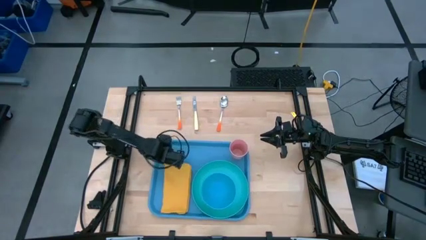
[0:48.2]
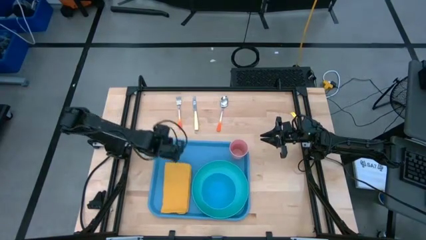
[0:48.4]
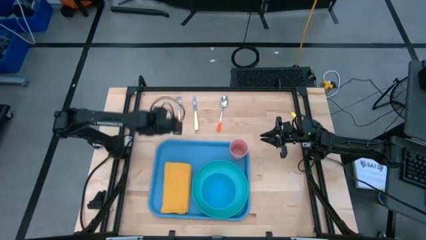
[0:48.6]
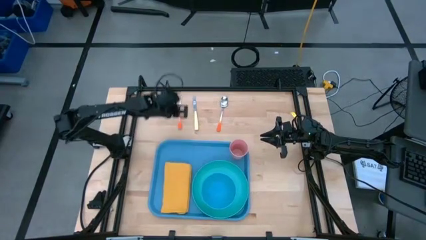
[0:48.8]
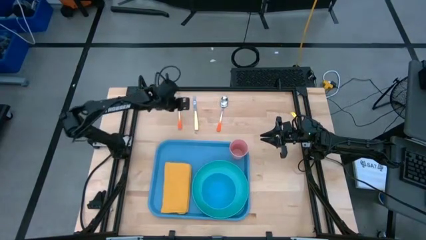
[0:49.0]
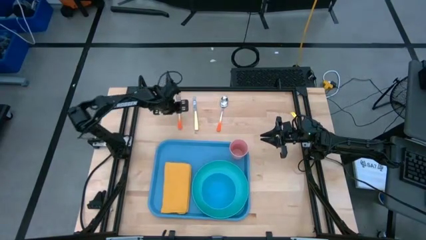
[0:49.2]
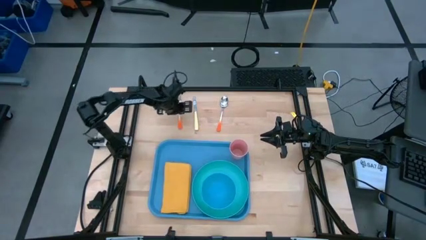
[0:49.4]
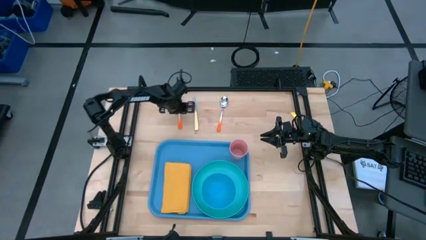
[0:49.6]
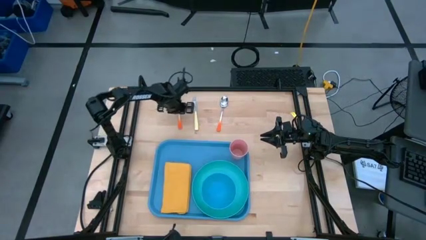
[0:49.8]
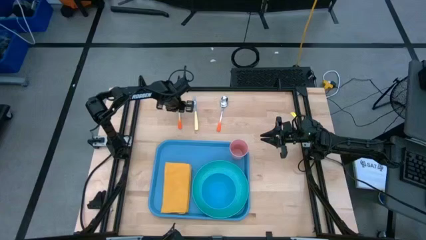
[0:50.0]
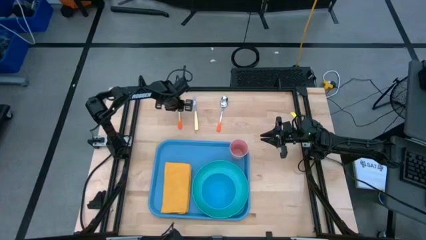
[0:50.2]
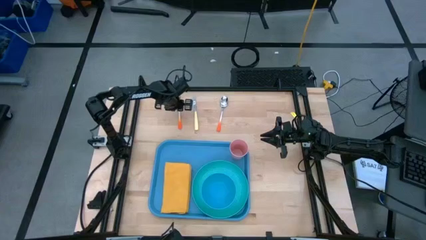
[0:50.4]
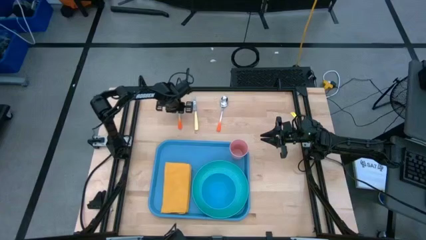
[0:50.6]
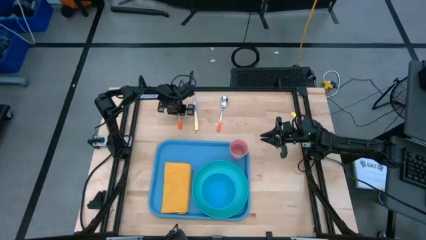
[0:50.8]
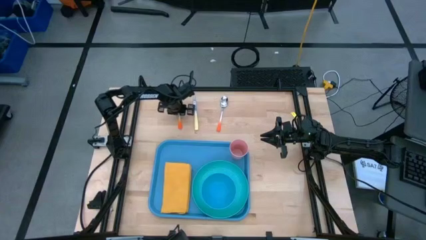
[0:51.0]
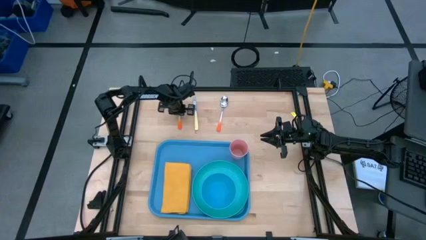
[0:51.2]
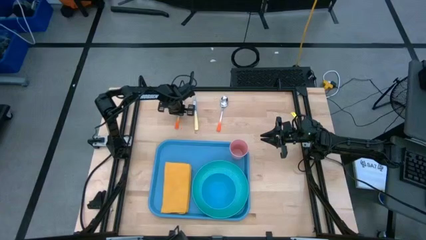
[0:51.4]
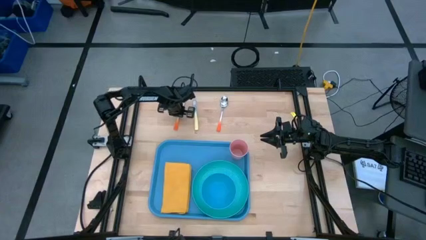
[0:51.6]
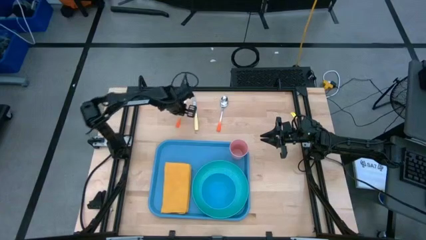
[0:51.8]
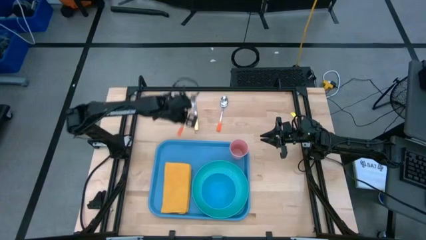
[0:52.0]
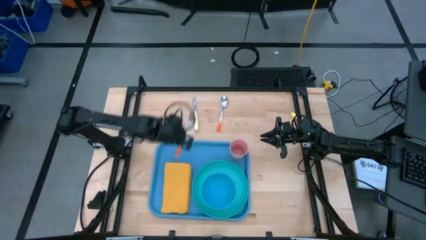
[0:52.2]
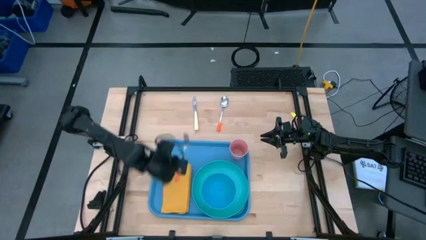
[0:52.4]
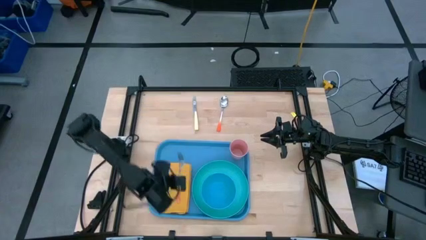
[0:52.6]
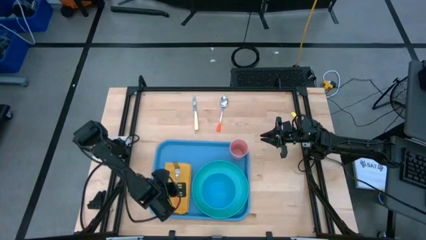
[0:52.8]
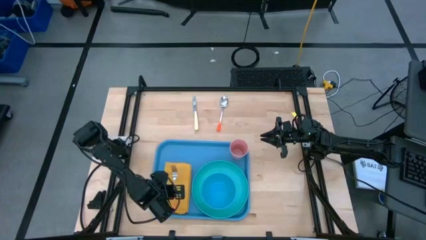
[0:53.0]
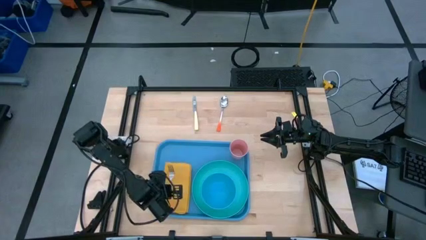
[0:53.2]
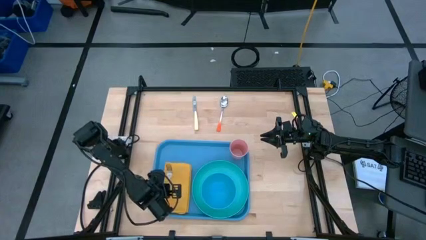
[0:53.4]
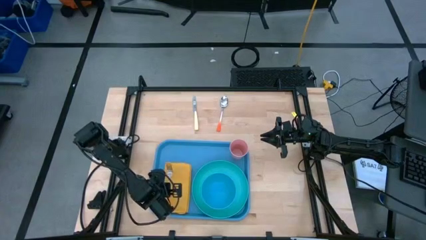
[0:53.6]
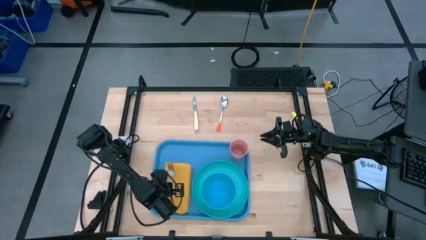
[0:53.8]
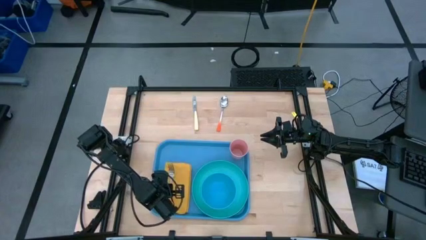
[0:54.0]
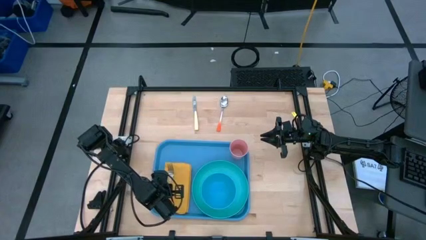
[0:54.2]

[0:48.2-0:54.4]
Task: Set up tray
Put the orange fork on the yellow napkin

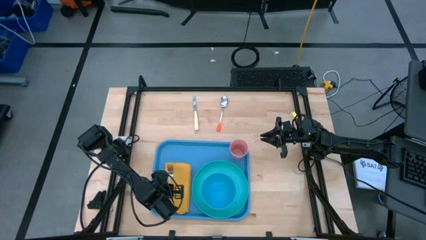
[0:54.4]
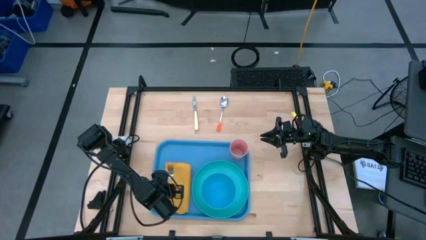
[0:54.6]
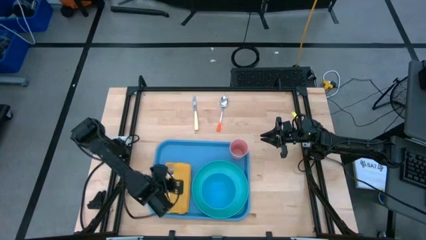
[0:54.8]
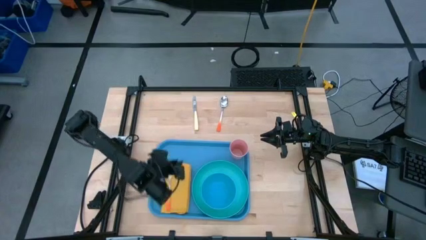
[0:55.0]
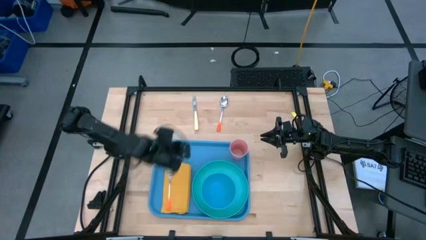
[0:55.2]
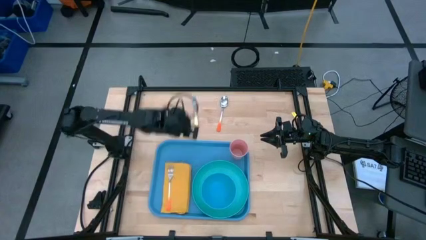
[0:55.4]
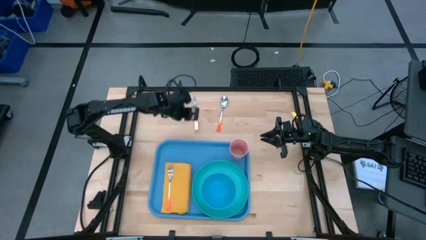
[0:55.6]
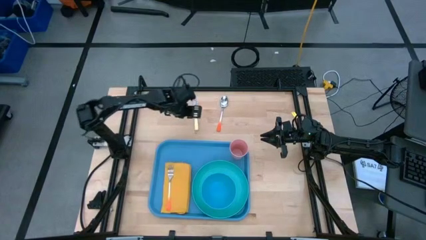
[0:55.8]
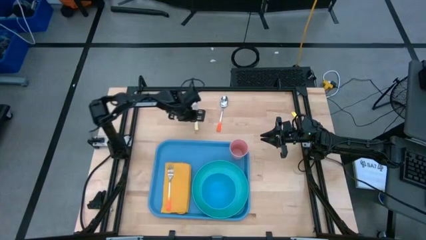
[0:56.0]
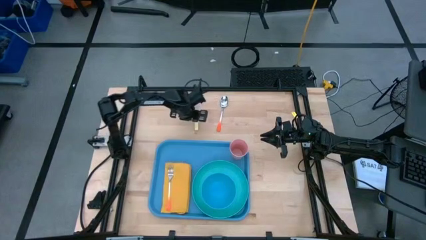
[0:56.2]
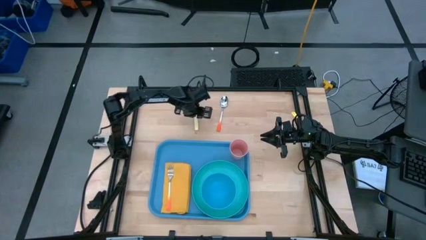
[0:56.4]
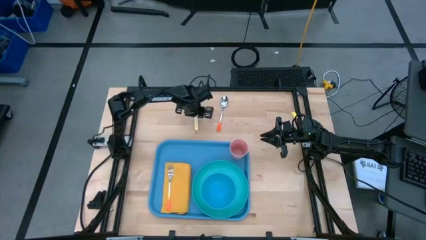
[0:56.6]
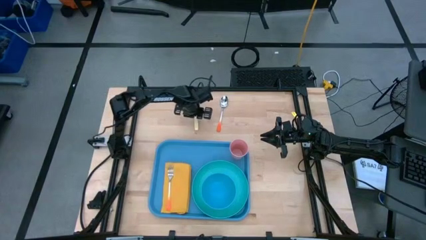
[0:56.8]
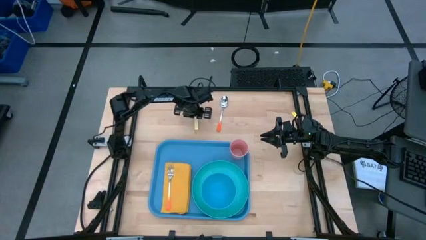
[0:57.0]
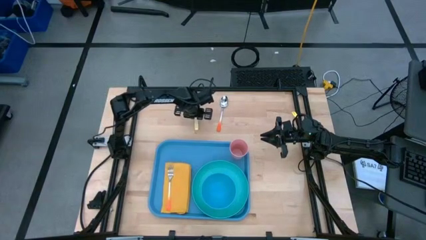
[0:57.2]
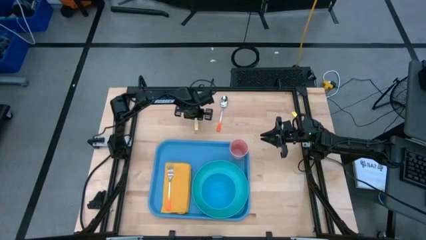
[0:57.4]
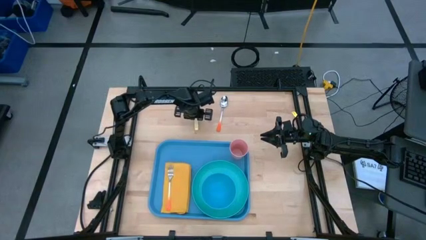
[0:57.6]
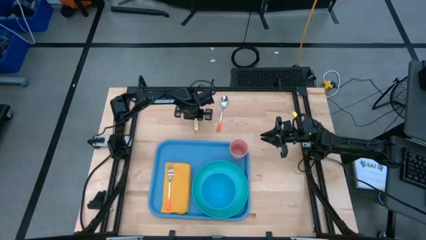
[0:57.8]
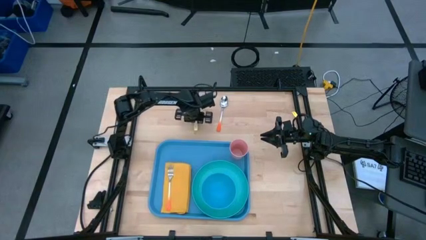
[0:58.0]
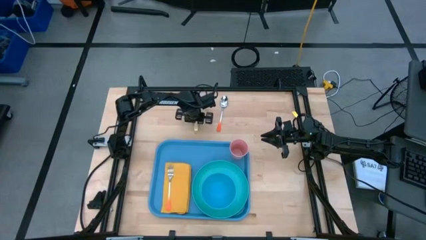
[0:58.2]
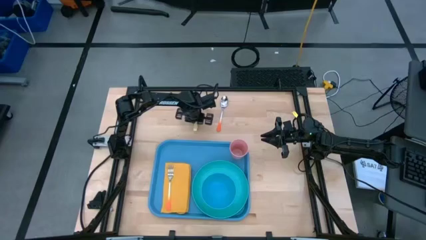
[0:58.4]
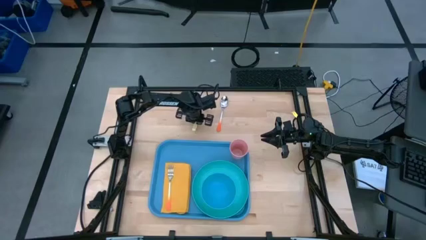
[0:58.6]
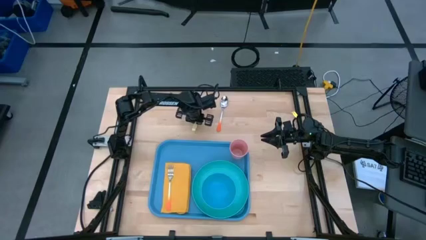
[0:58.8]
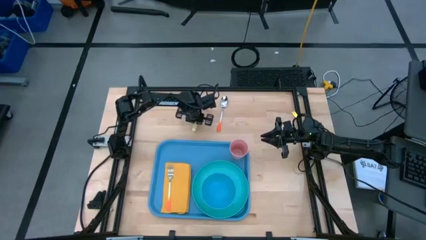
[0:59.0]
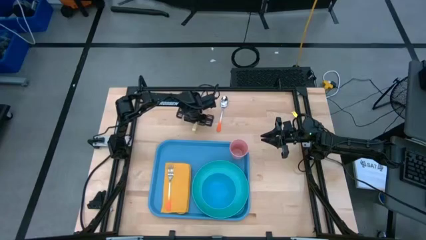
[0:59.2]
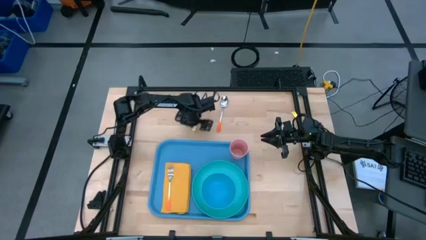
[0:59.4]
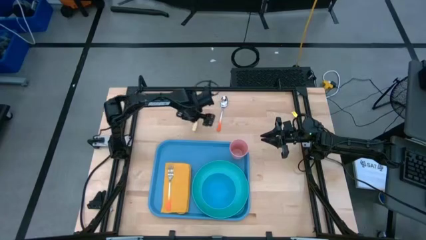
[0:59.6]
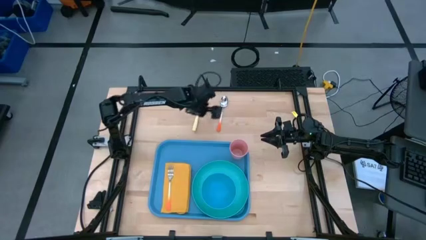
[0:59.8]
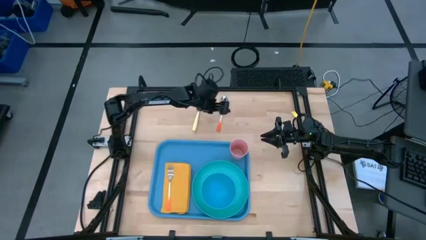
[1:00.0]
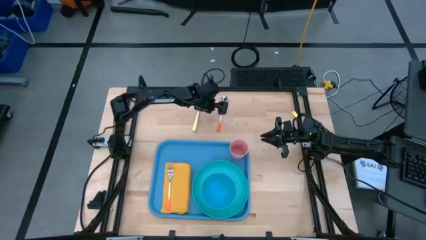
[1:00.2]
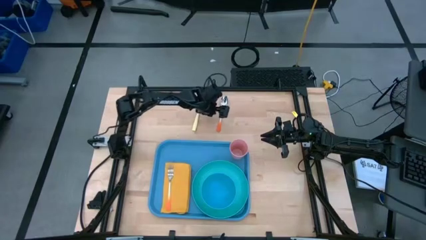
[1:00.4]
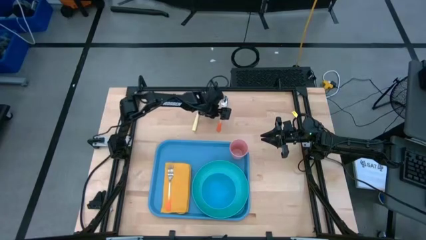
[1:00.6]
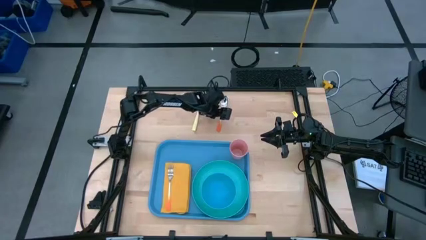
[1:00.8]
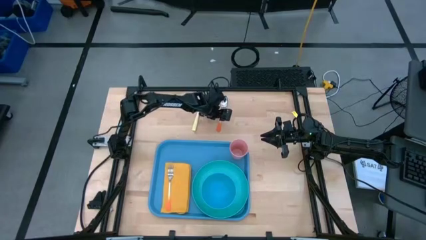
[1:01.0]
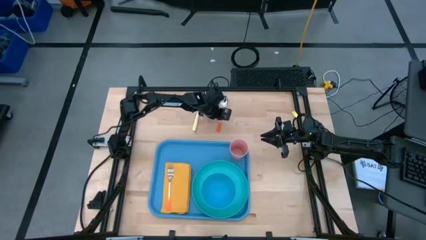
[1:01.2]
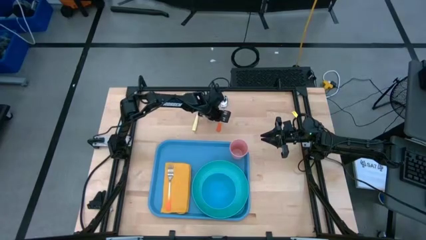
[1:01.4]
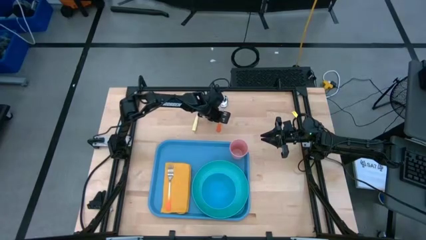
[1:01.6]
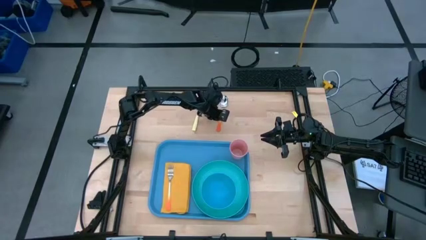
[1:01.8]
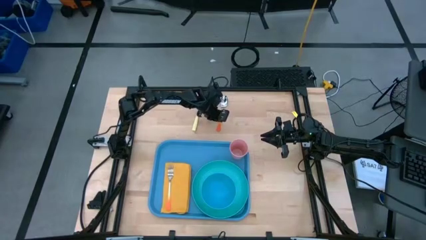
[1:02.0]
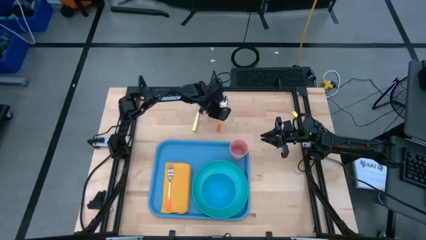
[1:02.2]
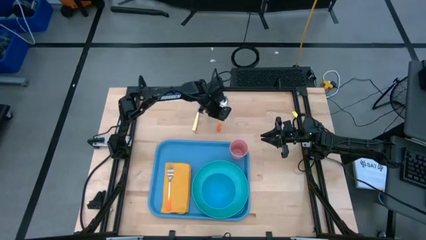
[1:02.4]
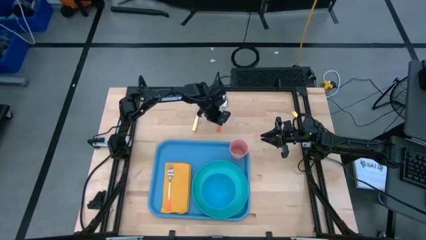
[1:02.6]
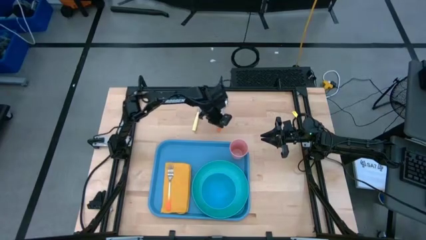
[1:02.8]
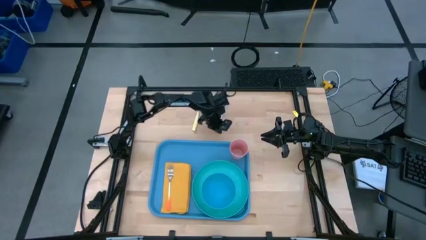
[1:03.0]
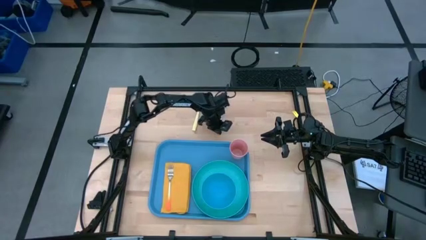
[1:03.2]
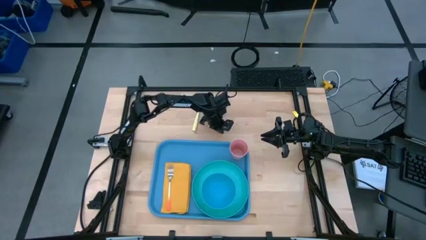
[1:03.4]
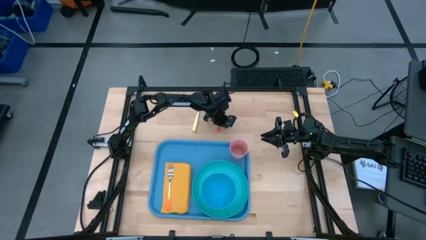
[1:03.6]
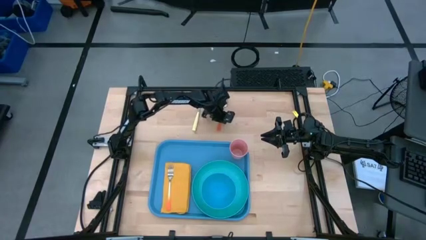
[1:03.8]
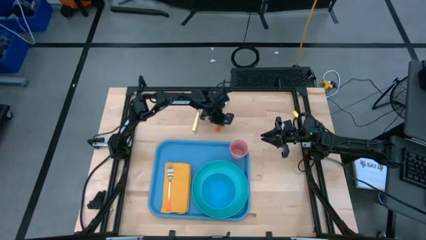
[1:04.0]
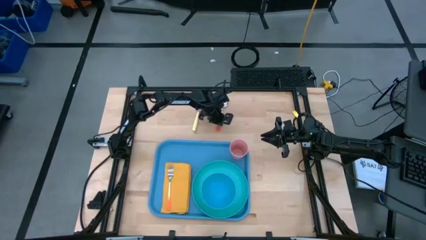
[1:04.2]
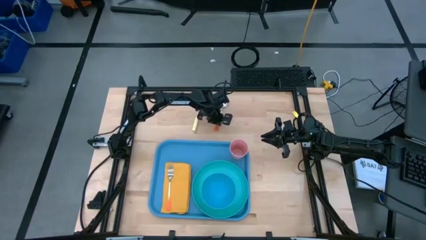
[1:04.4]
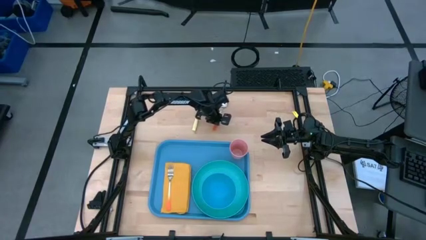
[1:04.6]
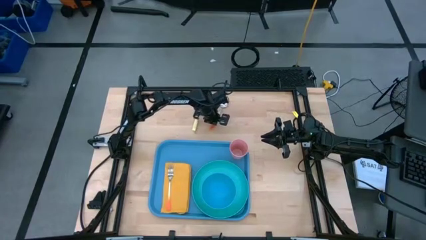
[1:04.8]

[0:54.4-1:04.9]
Put the orange spoon on the yellow napkin to the right of the orange fork
